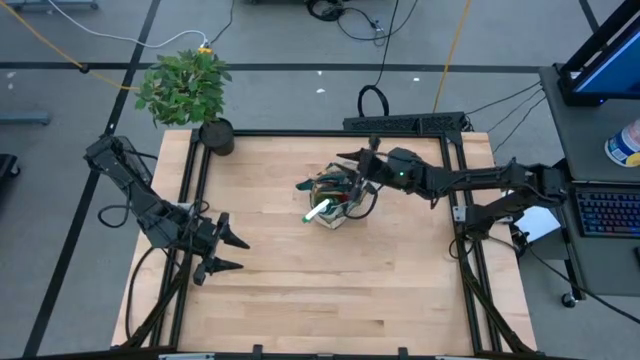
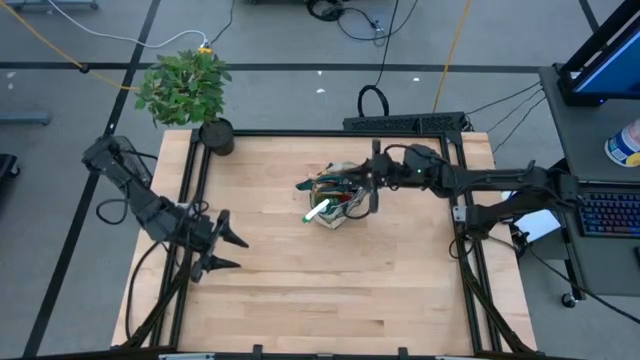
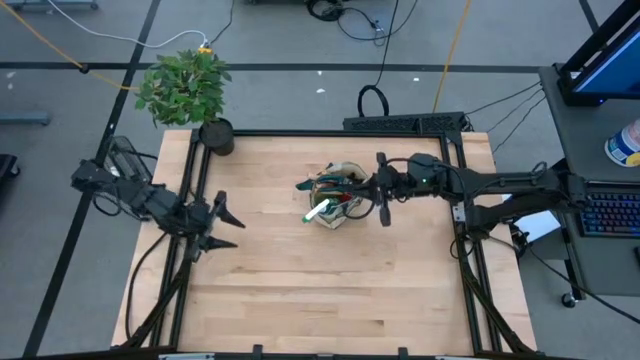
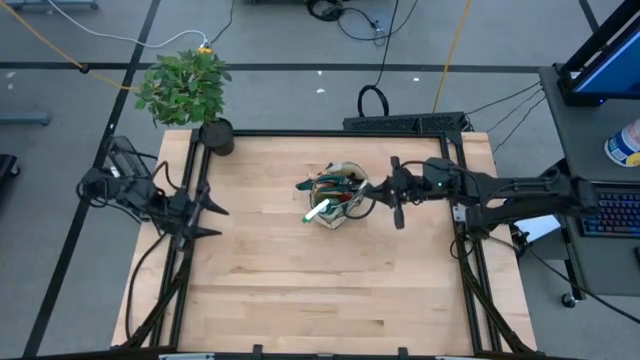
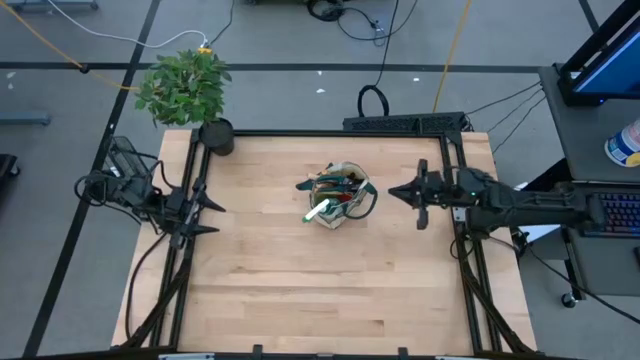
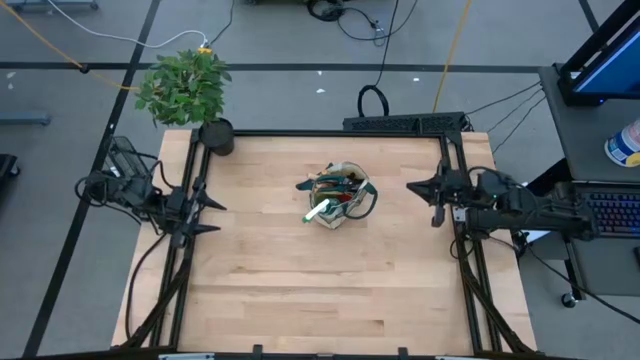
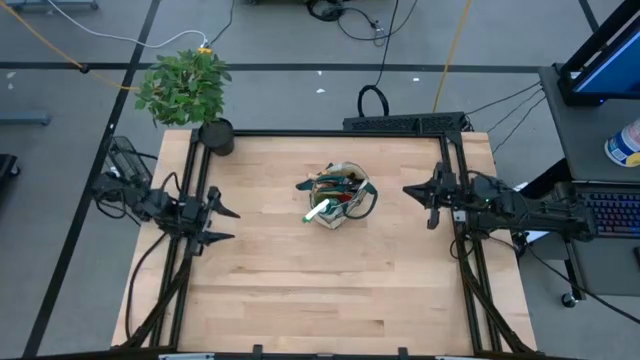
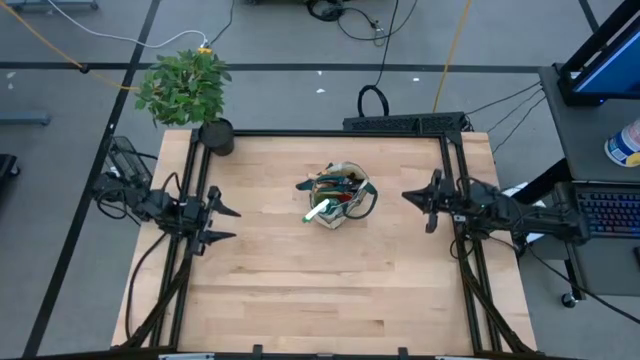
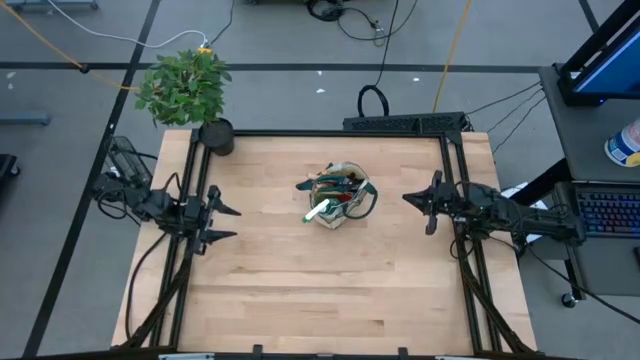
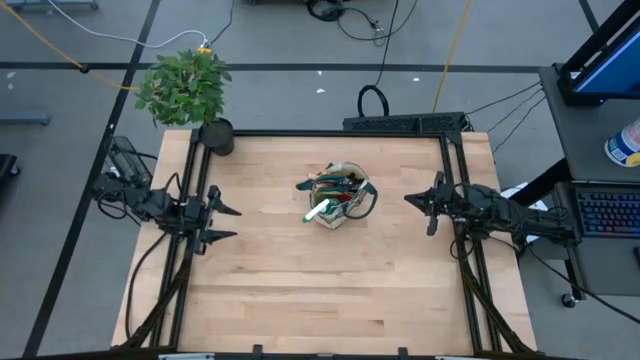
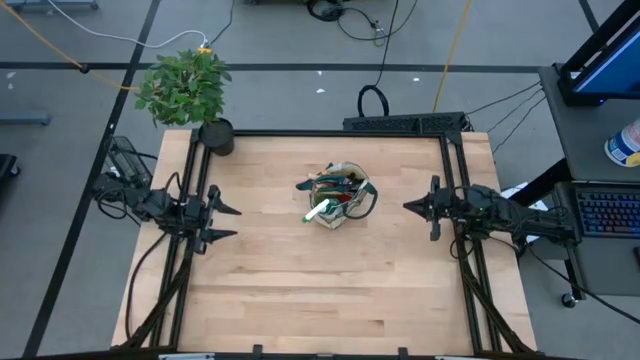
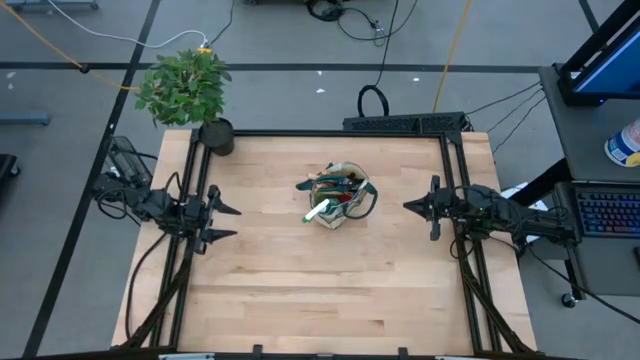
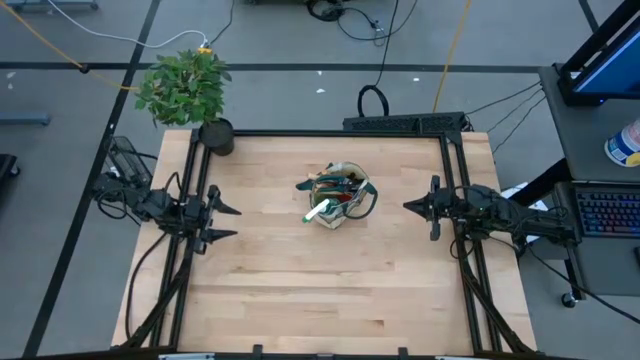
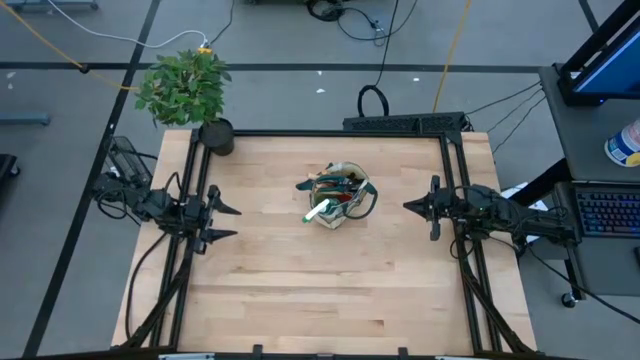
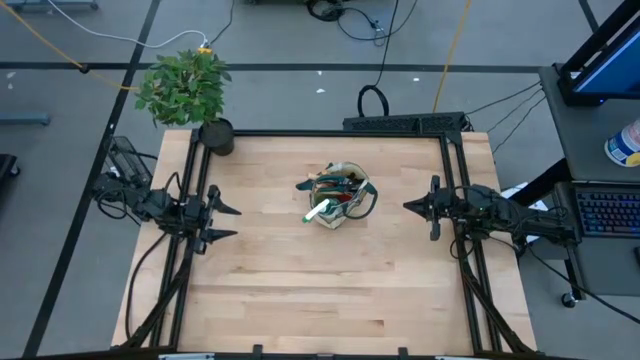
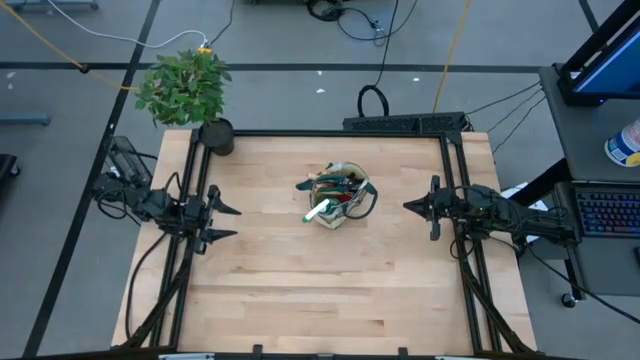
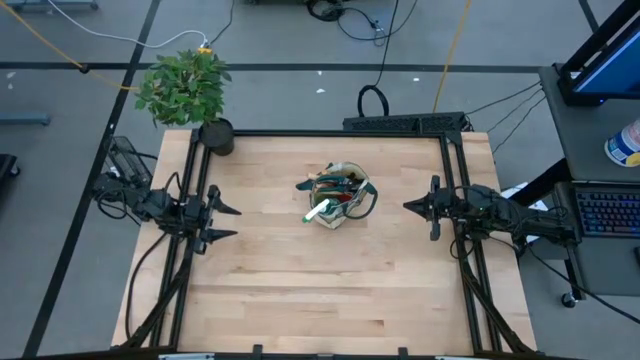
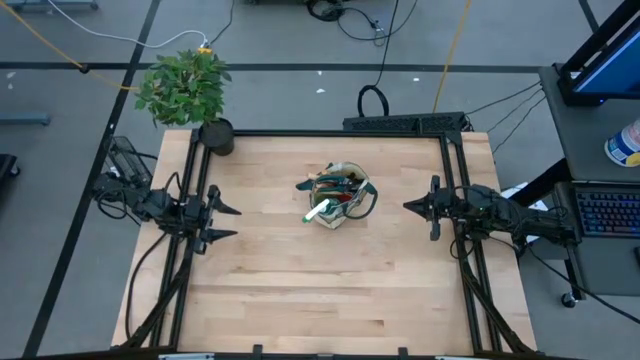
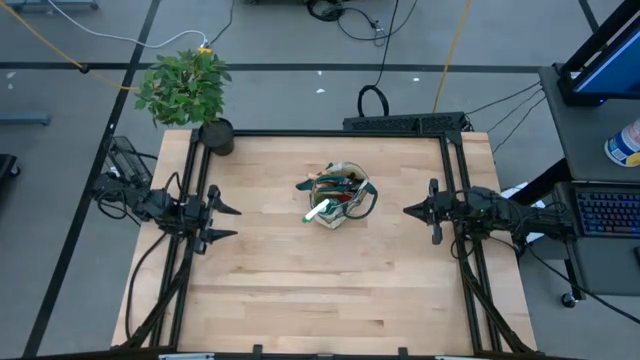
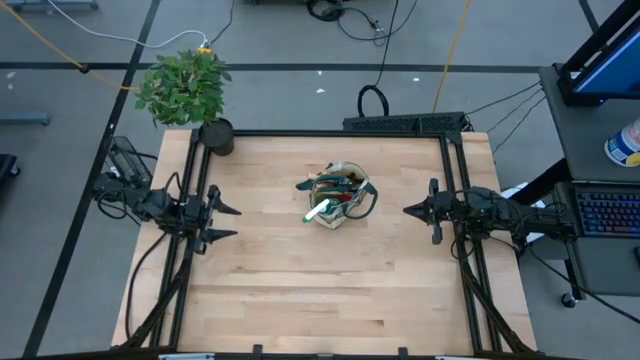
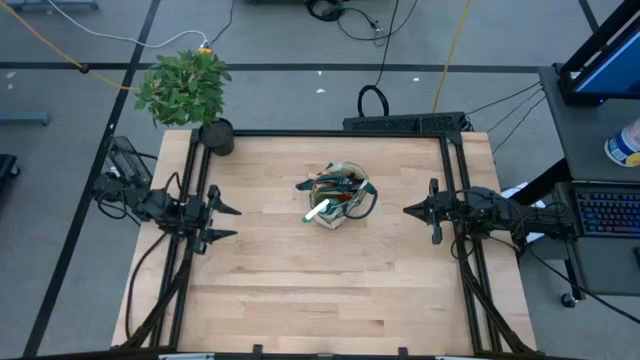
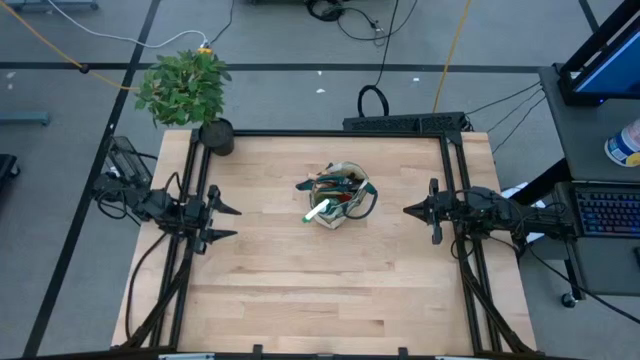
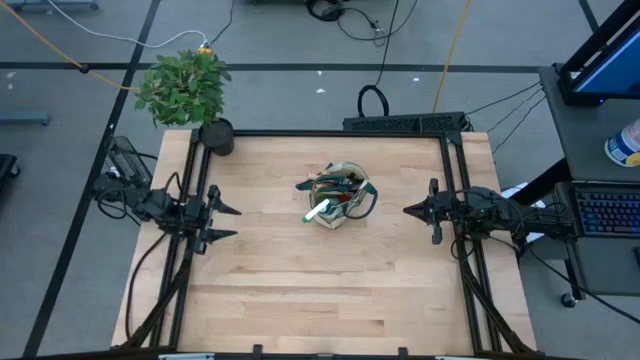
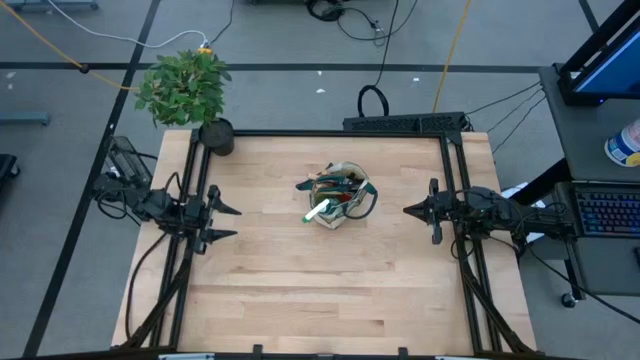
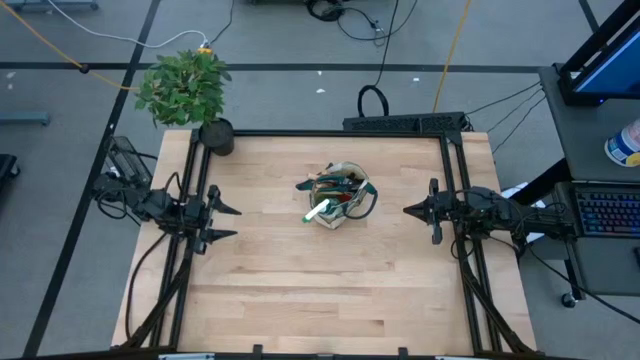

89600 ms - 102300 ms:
Task: Pick & Place Garden tools in Gardening bag
Return to Home Position

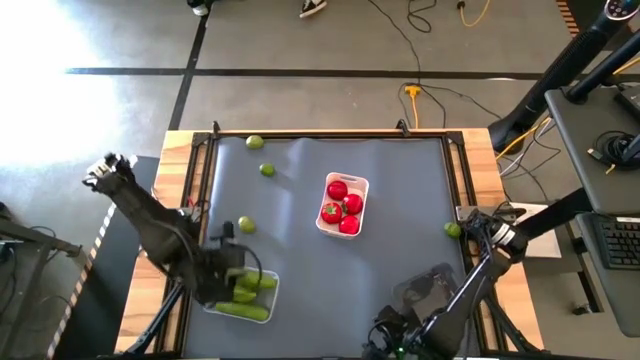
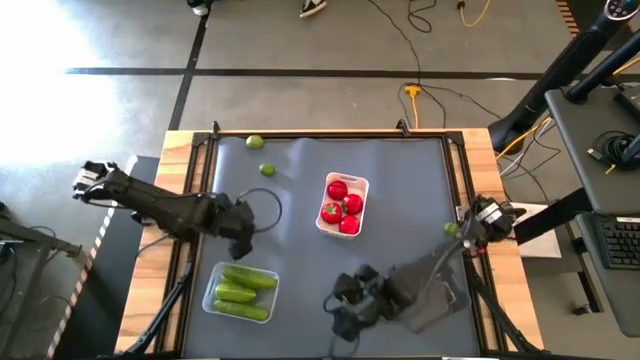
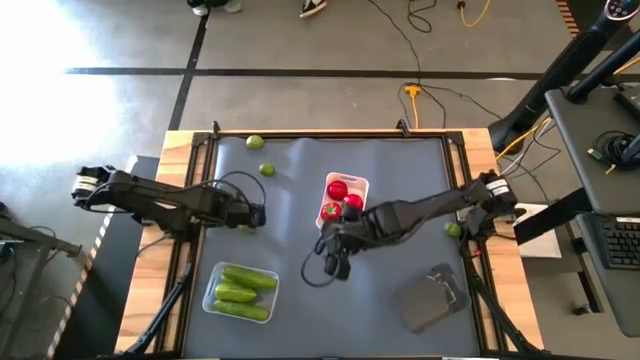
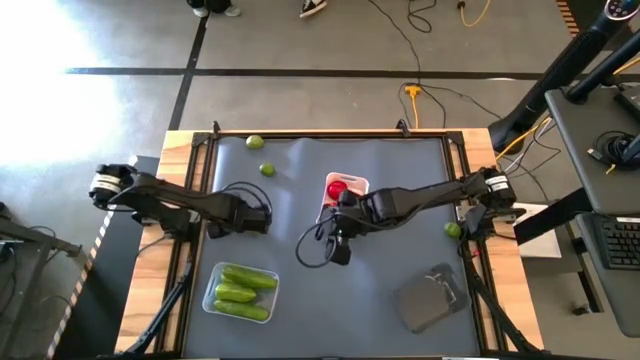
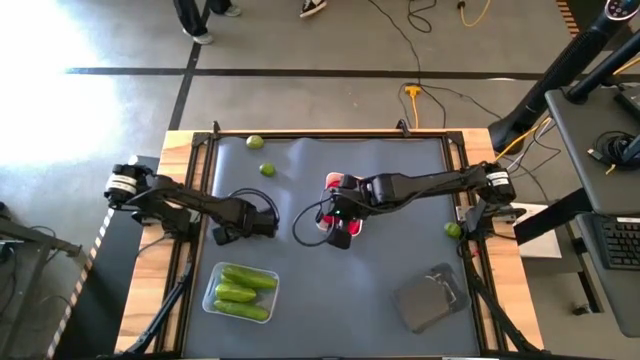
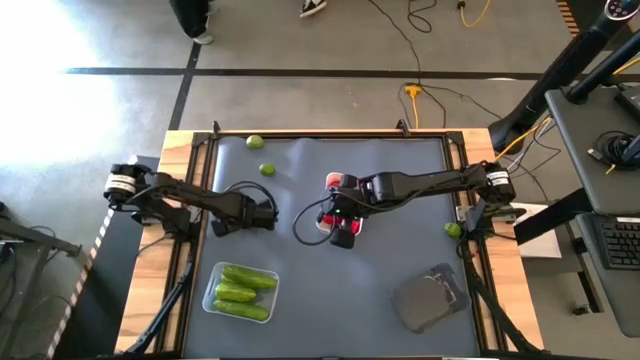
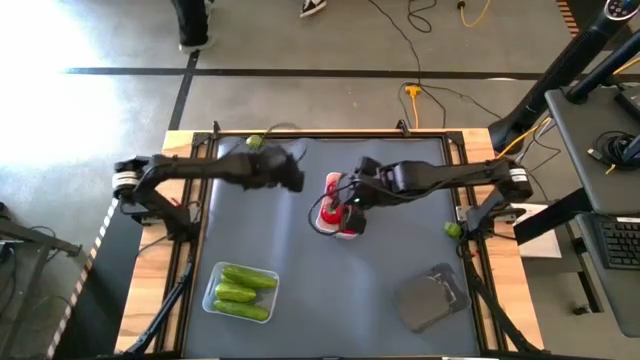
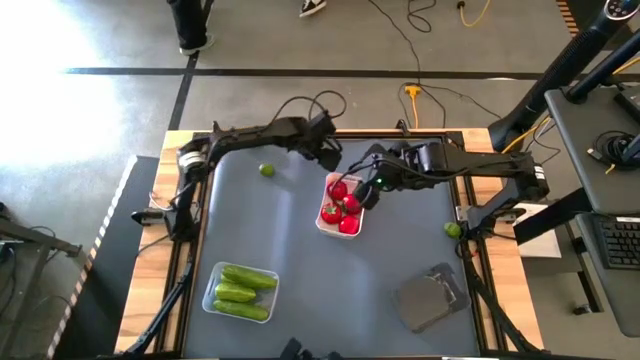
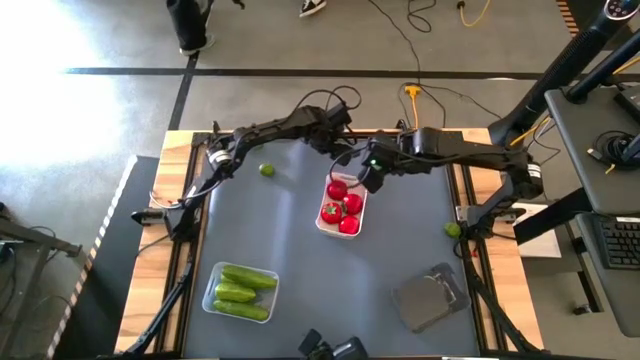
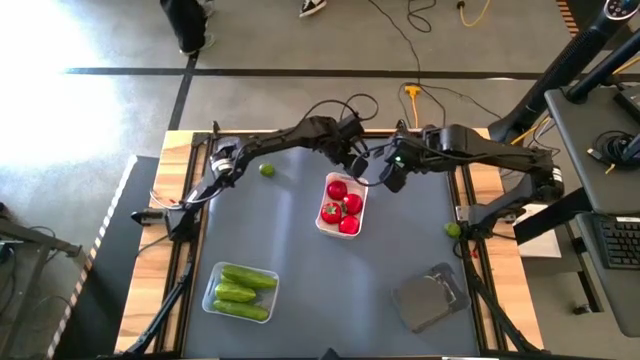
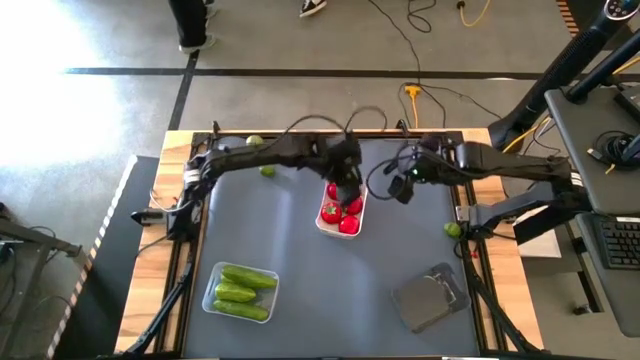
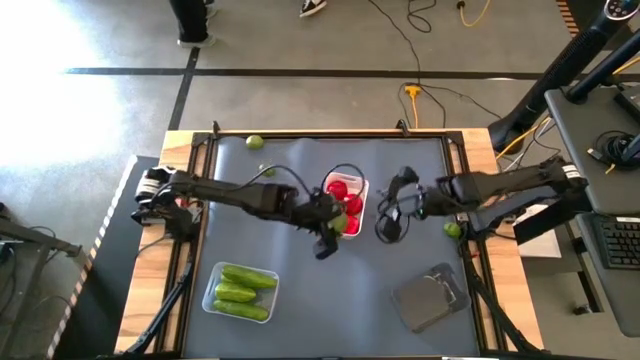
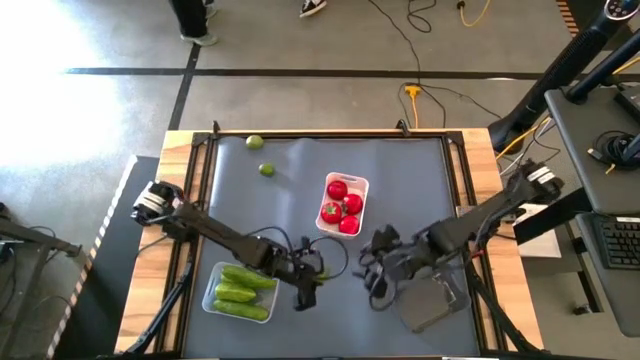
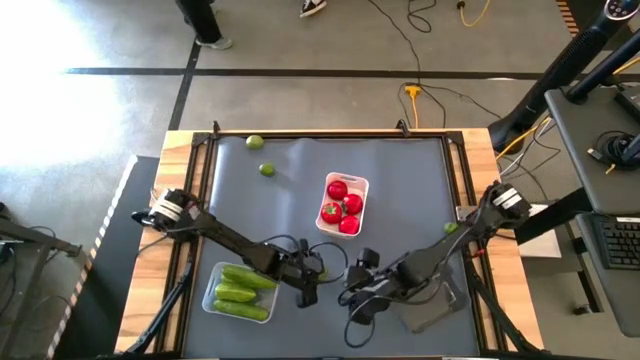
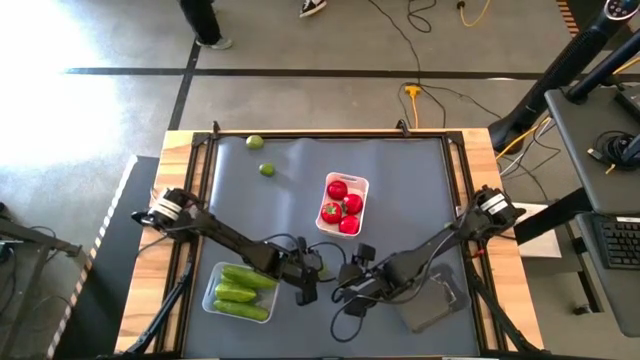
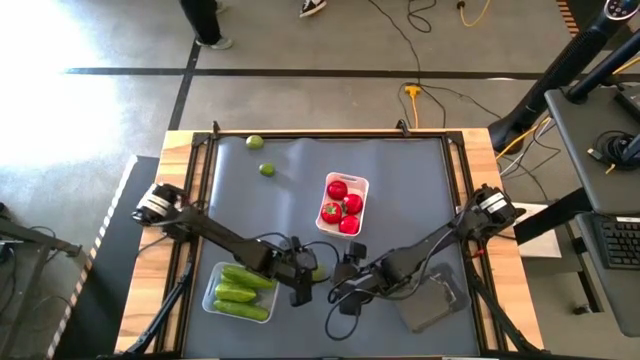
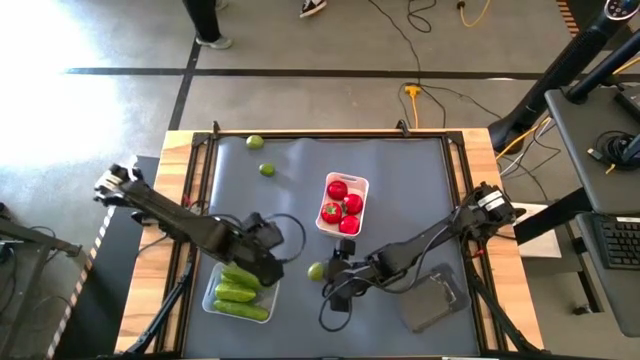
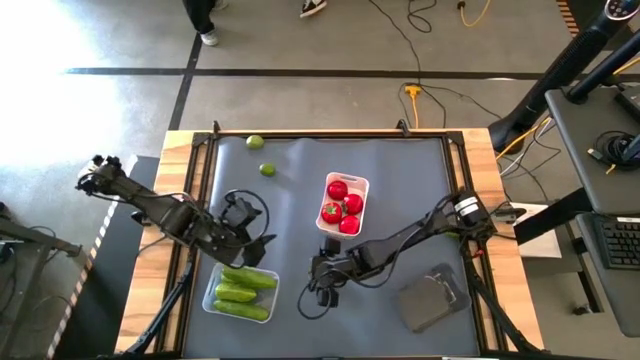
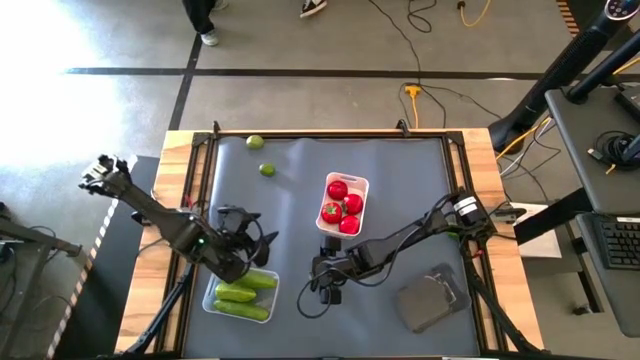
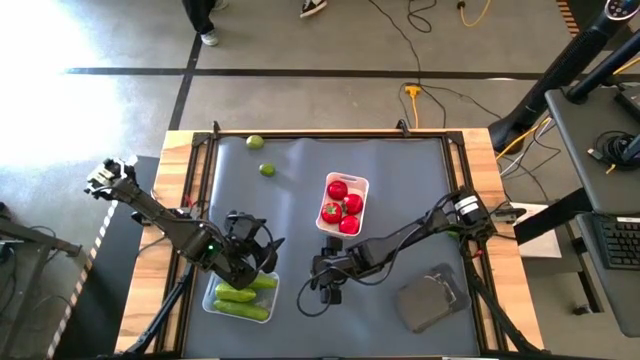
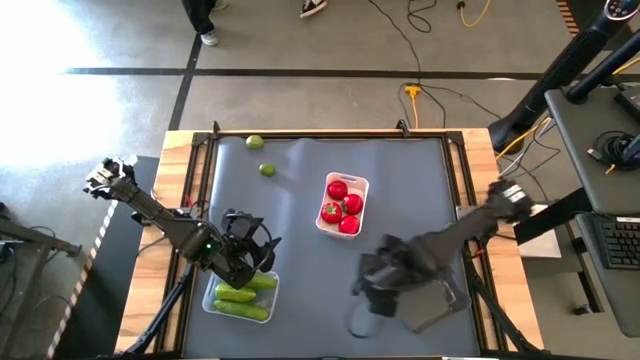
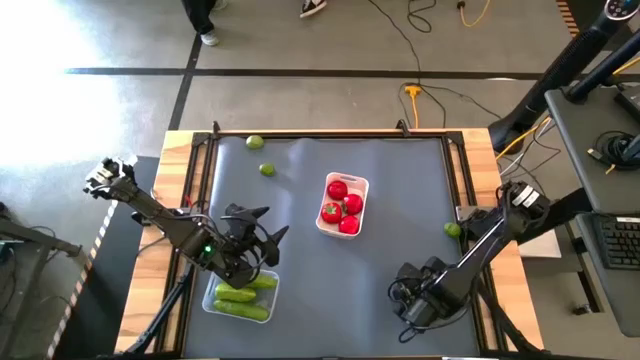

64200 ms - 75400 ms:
Task: Sort produce into baskets
Put the bottom left lime into the black transparent bin
